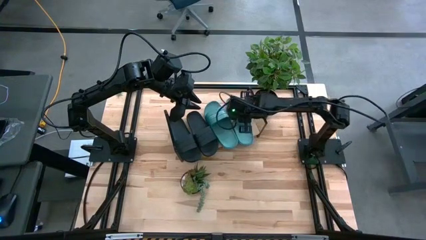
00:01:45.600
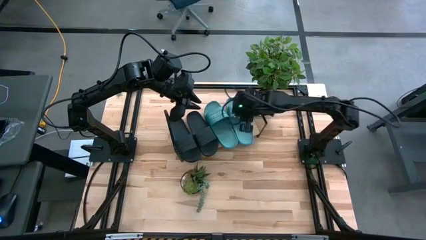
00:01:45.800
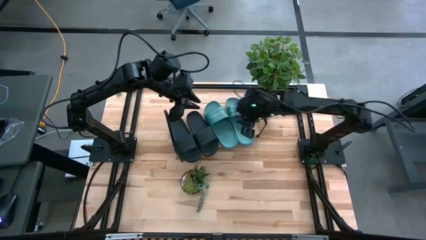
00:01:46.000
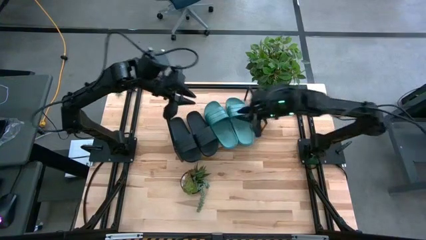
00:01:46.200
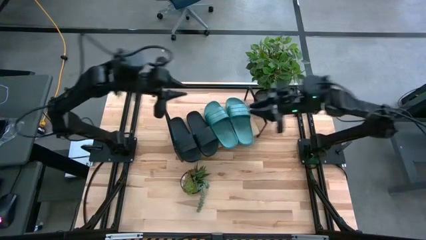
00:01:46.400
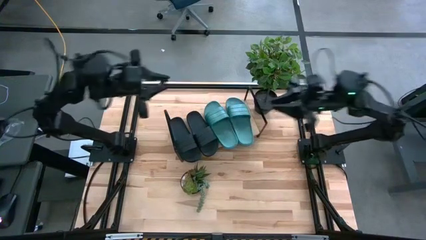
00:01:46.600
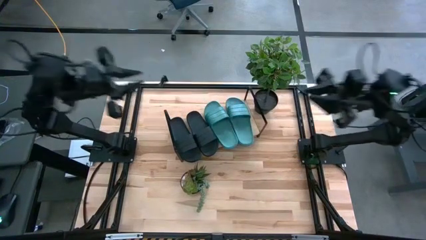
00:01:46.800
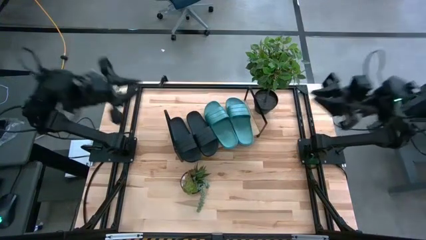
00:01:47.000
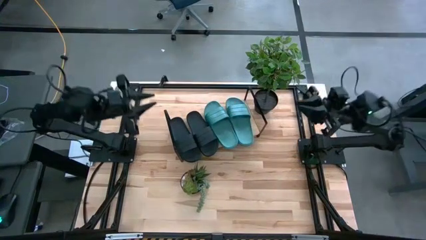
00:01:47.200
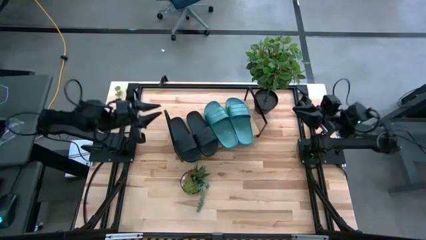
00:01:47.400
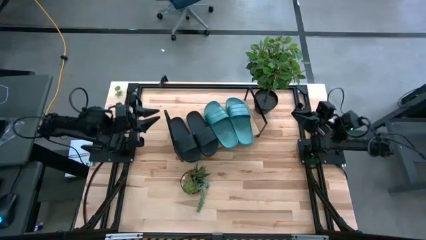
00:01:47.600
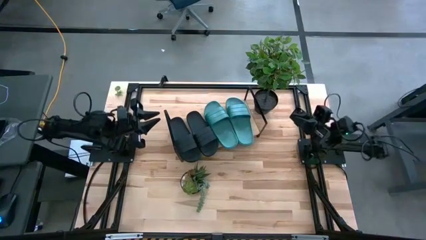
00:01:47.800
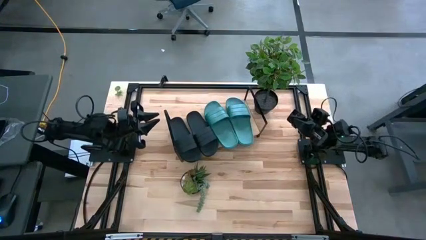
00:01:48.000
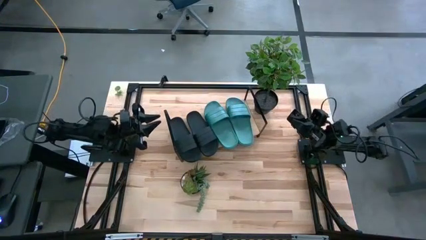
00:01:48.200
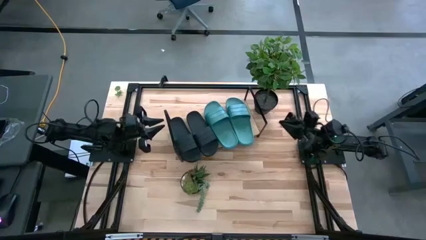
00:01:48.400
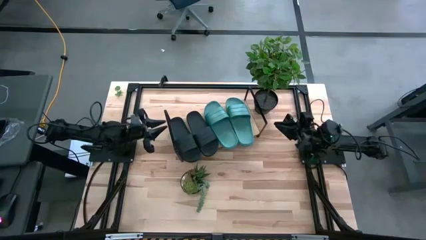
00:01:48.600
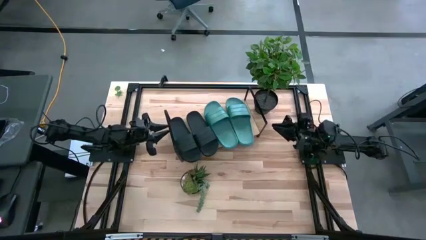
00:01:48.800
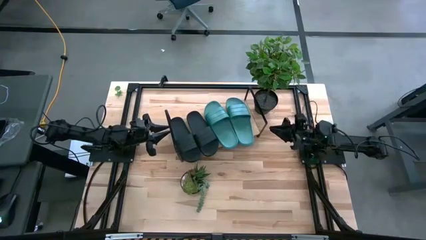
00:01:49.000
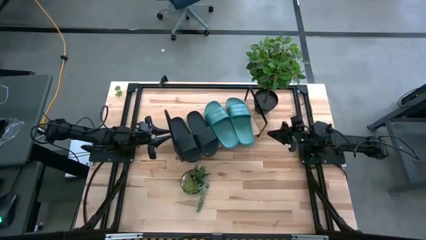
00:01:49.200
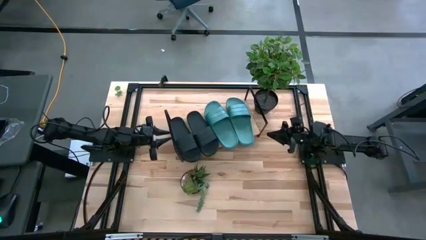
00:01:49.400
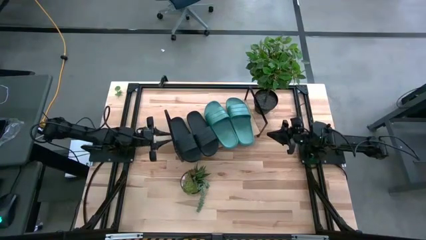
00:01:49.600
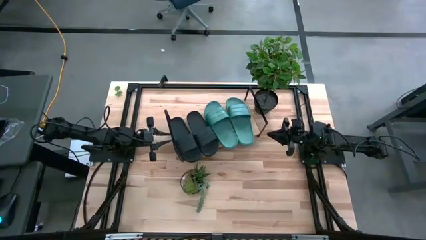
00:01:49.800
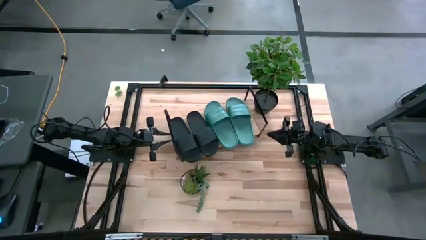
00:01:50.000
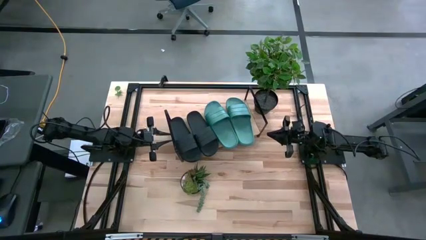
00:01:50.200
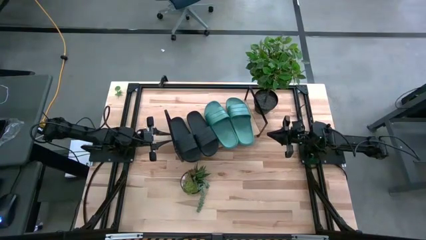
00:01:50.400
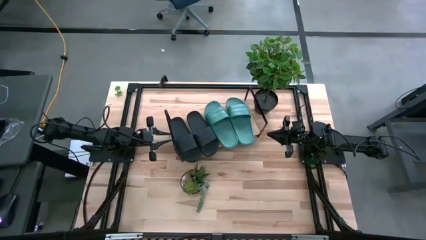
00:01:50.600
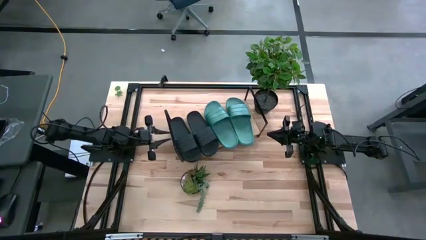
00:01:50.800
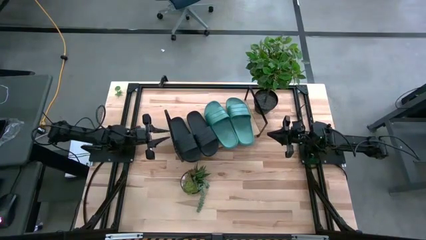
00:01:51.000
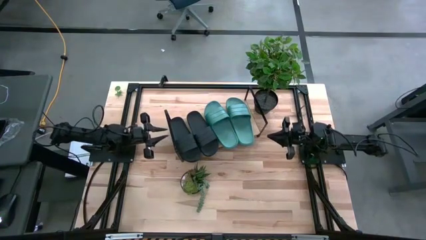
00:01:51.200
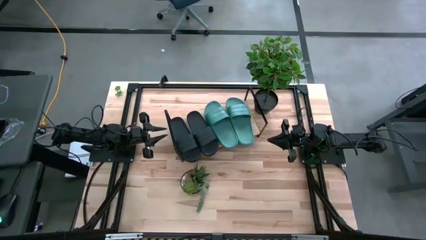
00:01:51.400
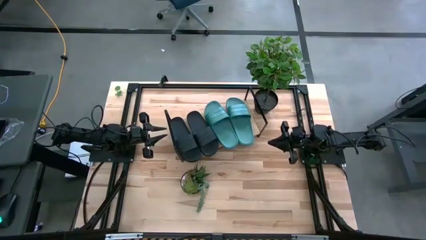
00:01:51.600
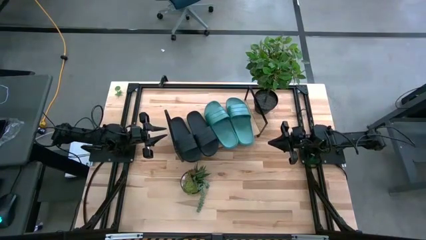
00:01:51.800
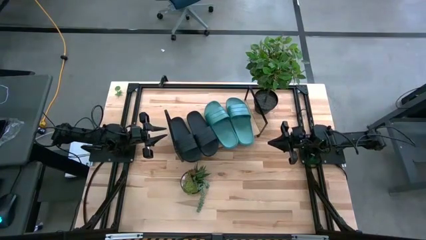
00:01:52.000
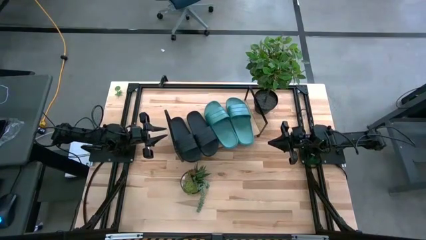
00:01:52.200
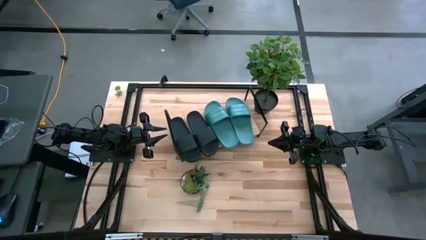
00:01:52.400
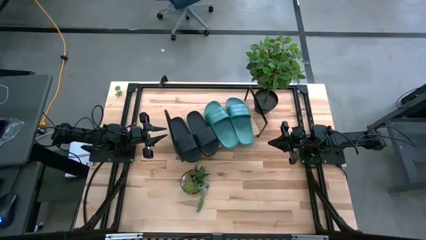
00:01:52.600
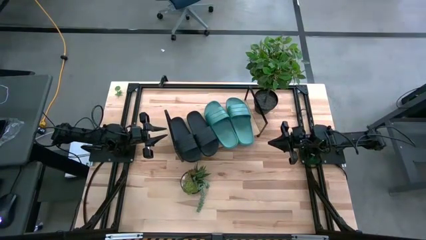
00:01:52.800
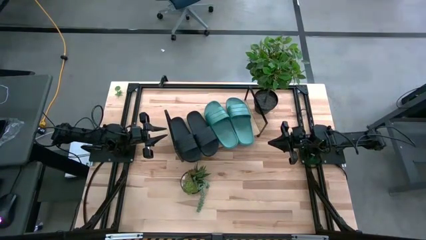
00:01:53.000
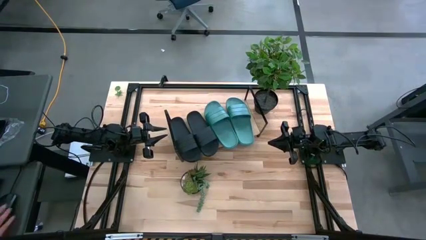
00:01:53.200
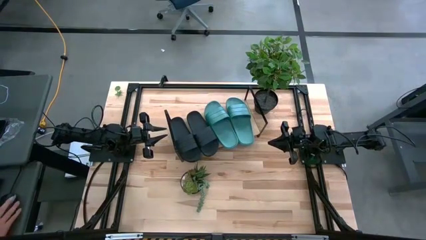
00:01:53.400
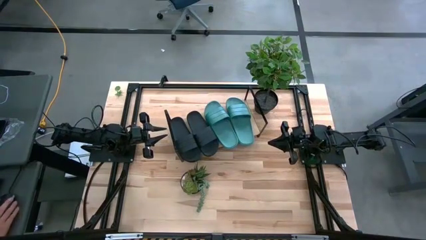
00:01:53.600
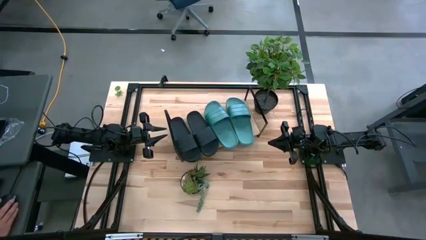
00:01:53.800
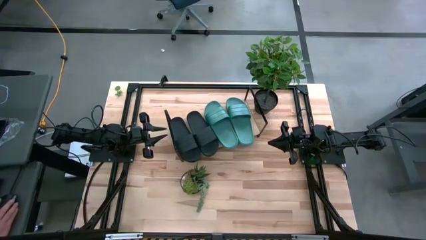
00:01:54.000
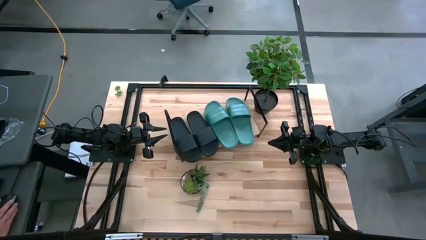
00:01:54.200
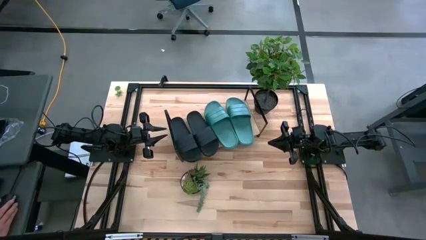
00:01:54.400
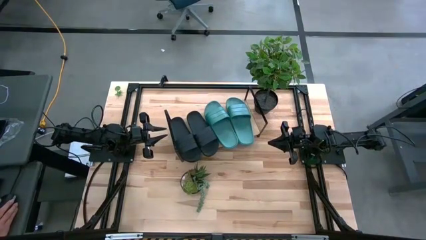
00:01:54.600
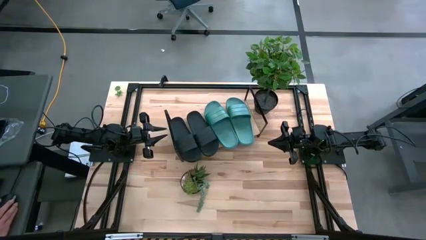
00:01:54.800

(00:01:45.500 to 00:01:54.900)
Task: Pick and place slides into the shelf
Return to home position

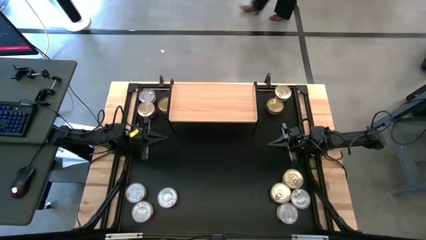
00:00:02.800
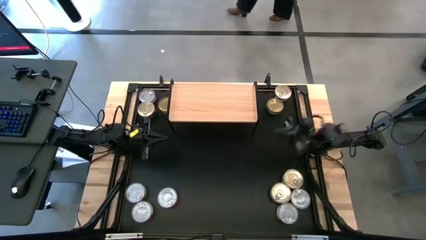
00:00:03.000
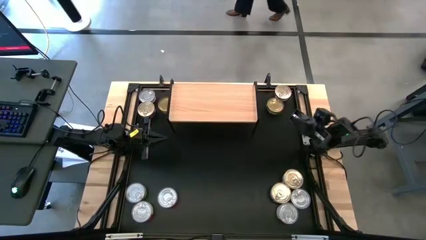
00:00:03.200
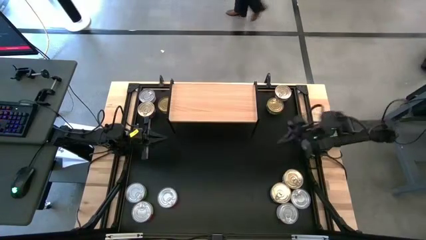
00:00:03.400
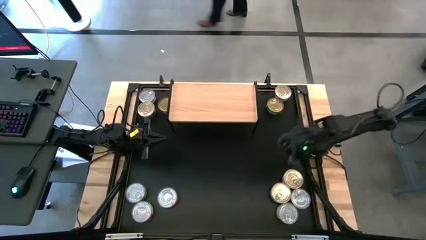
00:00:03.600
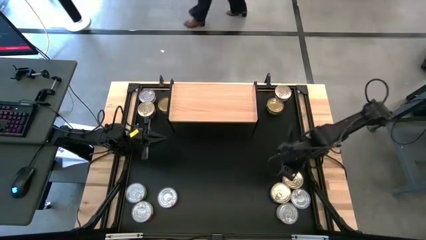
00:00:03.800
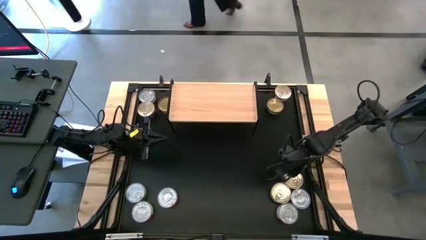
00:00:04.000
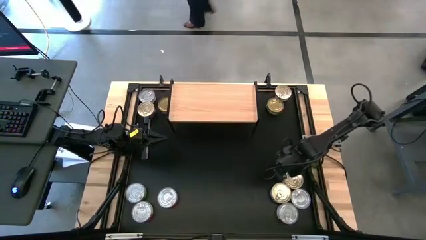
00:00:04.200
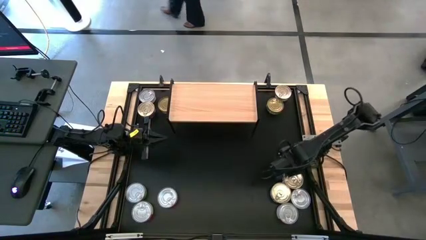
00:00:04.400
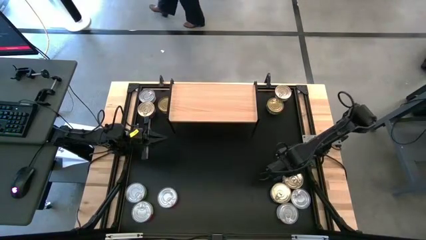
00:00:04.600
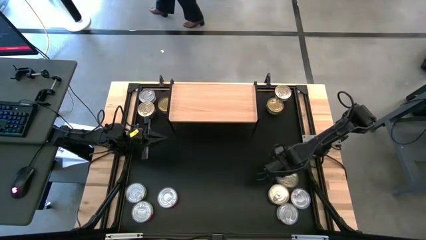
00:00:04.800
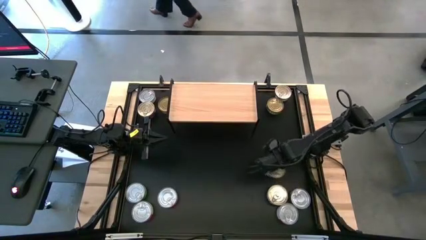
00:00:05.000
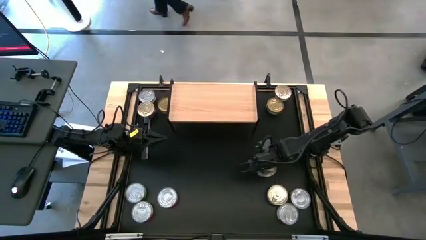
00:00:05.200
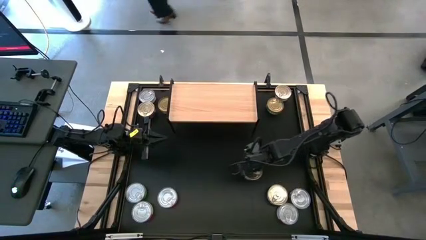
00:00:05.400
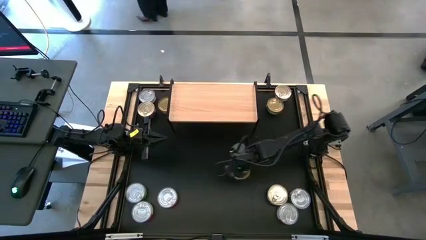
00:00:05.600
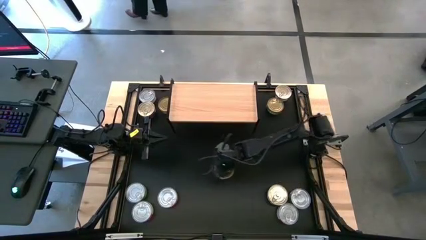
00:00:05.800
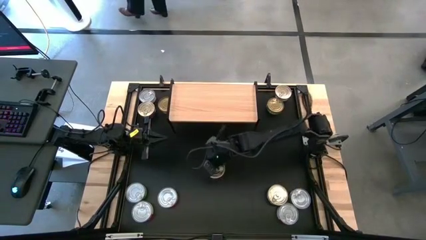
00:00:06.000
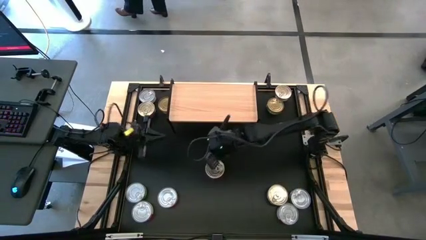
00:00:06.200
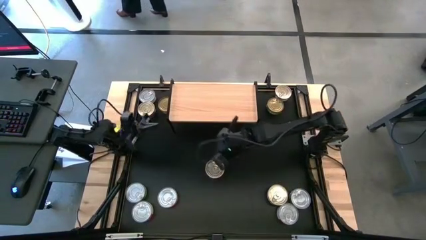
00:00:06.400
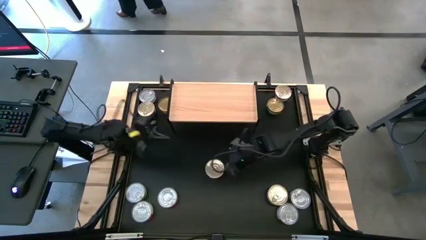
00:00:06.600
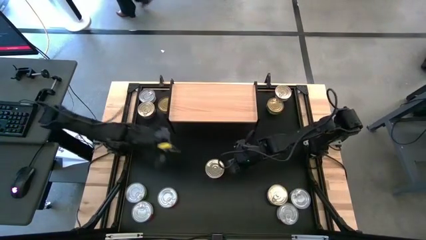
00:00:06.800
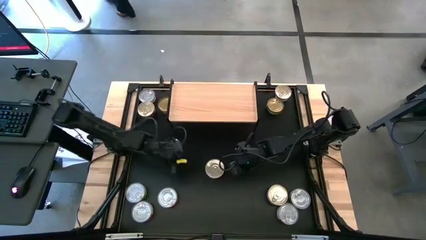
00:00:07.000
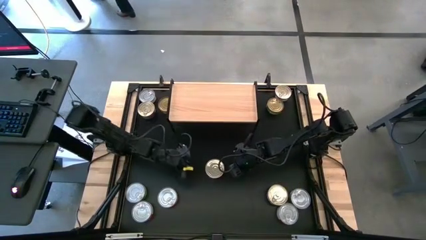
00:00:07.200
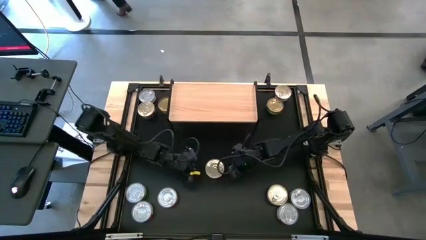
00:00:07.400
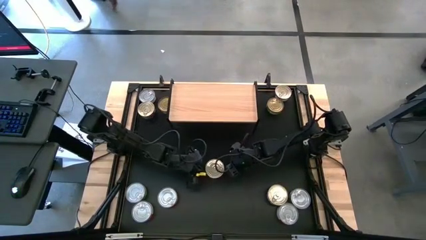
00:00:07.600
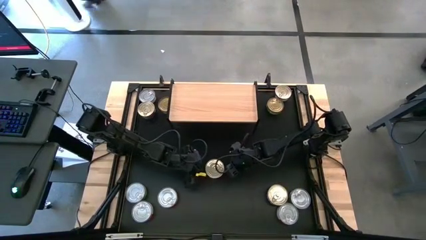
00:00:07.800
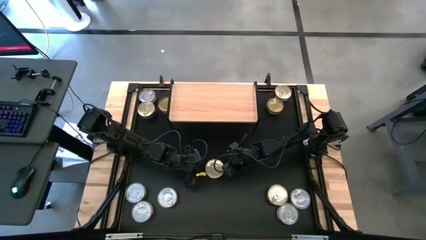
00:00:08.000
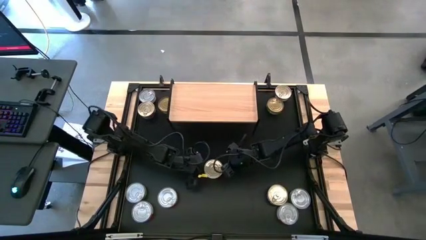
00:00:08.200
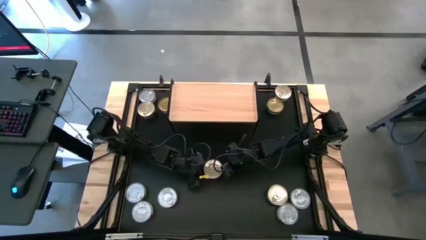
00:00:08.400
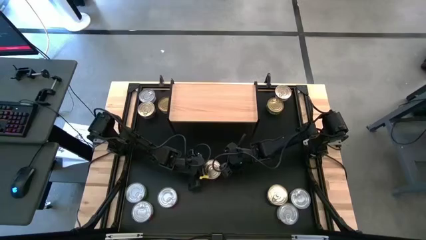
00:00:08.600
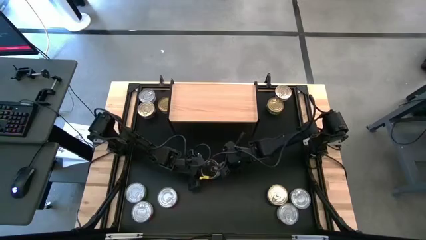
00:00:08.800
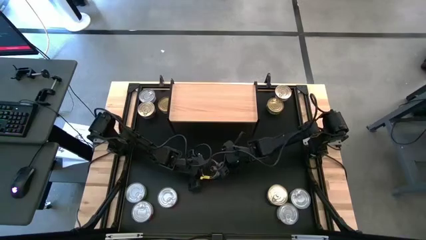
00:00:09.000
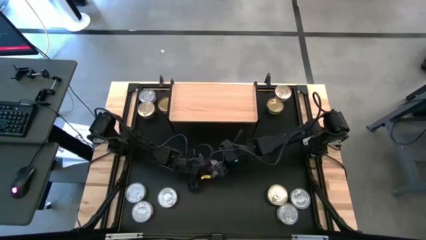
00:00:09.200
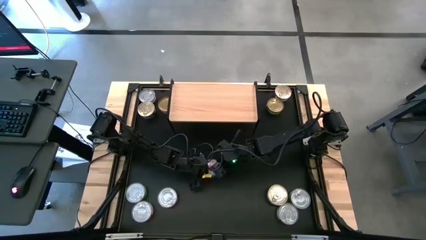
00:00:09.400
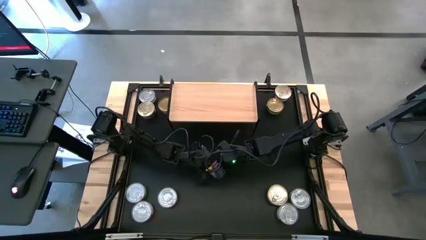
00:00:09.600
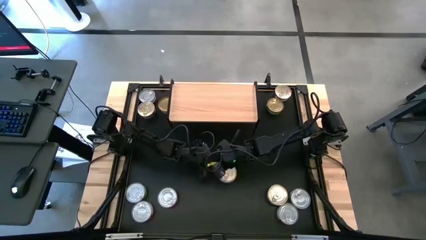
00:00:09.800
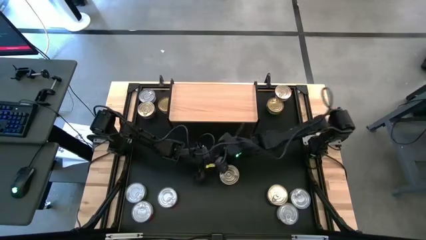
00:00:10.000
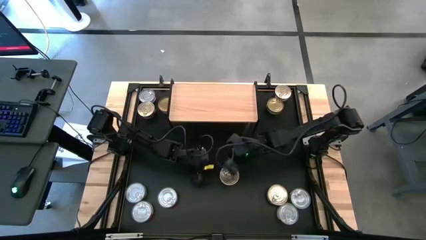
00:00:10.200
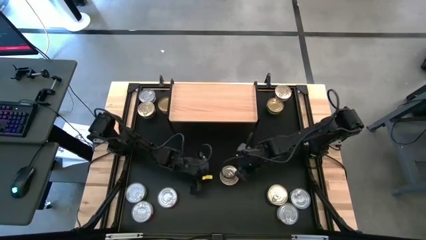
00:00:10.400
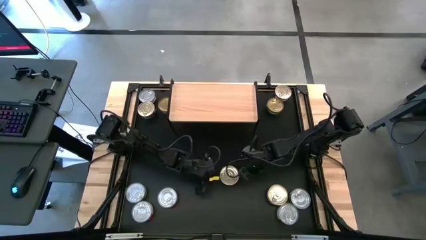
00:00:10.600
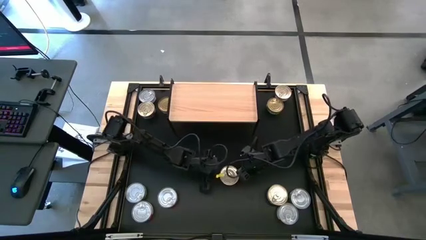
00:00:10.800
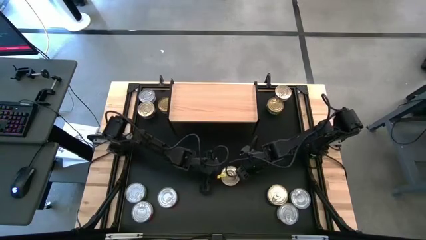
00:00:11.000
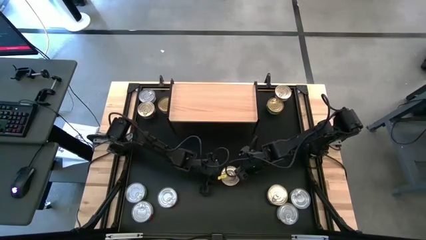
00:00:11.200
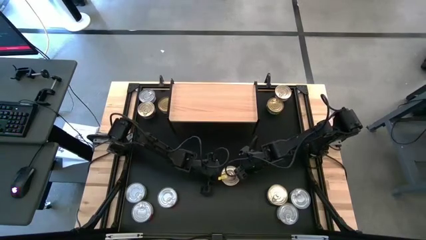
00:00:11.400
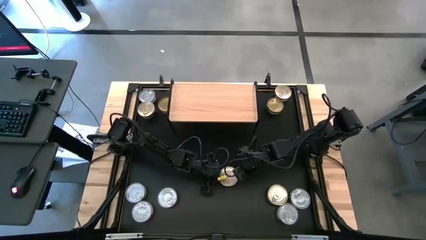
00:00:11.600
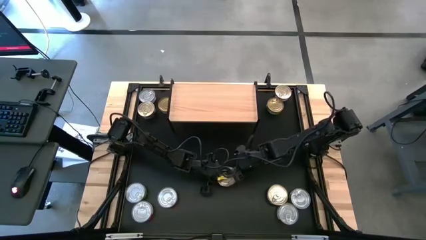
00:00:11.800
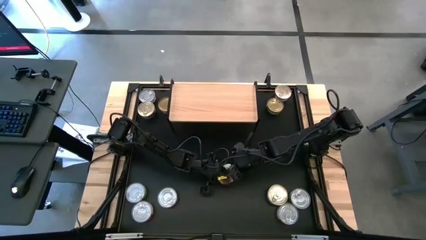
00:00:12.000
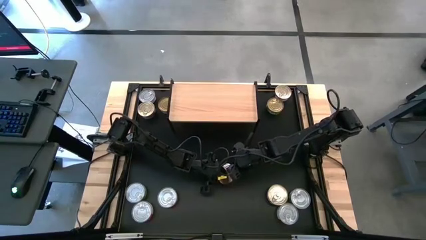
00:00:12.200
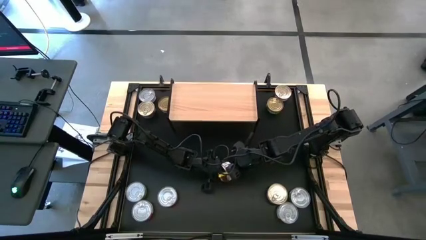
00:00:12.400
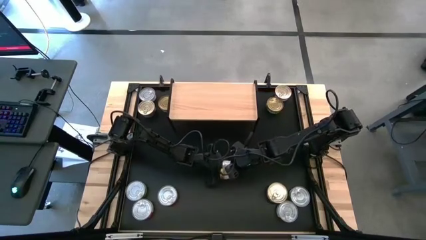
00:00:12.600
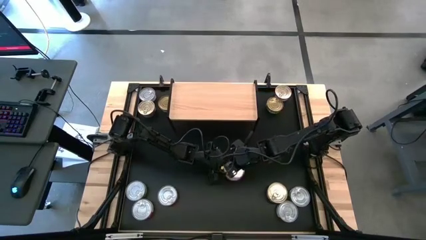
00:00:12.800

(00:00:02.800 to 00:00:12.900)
Task: Stack canned seafood by type on shelf
Put the blue and pink tuna can on the shelf
